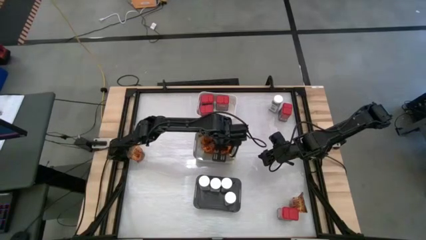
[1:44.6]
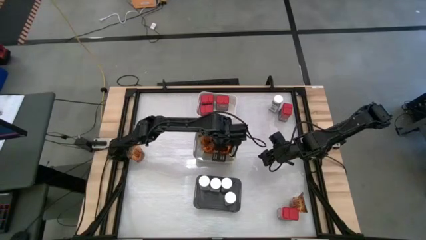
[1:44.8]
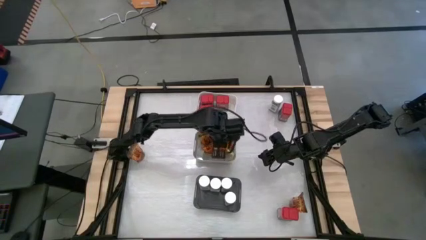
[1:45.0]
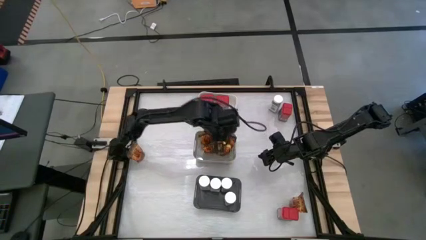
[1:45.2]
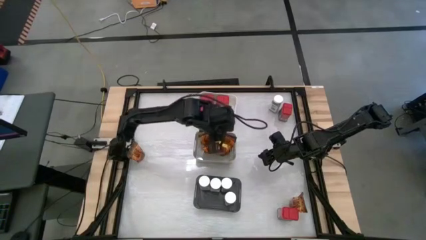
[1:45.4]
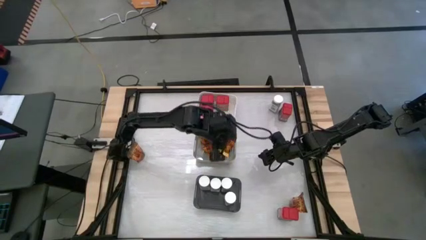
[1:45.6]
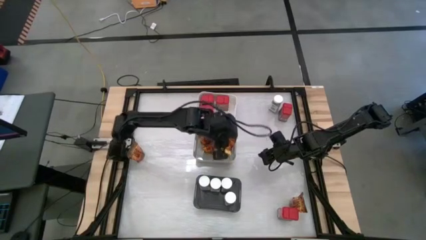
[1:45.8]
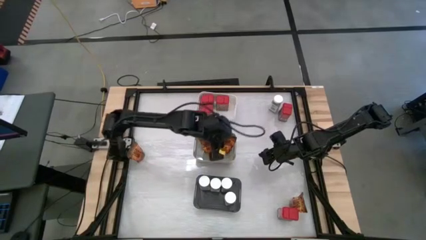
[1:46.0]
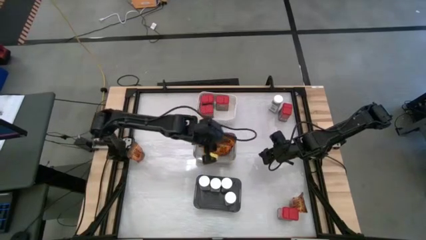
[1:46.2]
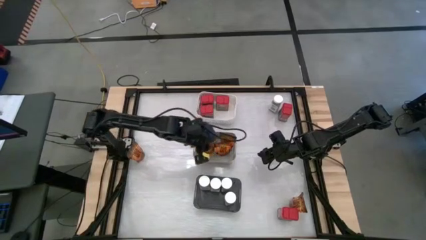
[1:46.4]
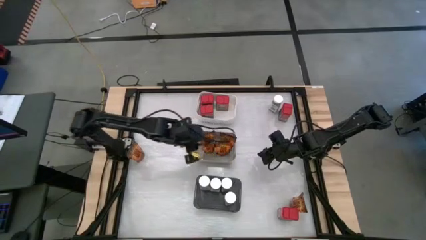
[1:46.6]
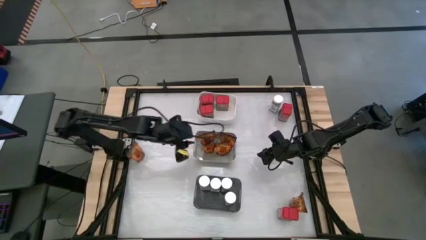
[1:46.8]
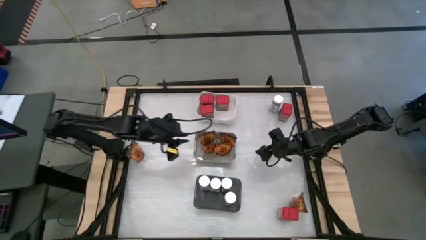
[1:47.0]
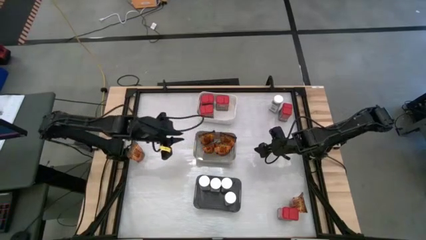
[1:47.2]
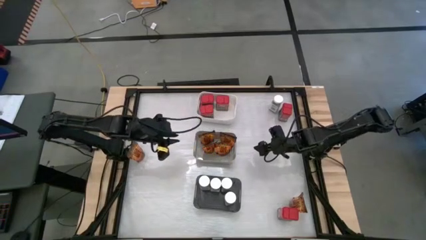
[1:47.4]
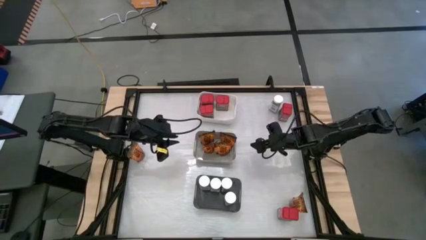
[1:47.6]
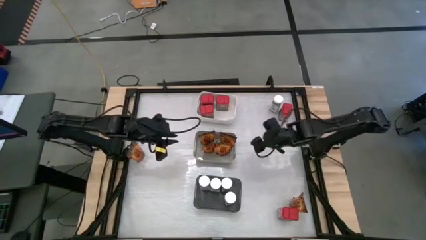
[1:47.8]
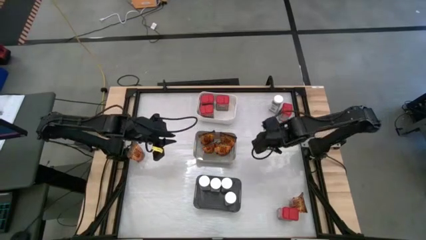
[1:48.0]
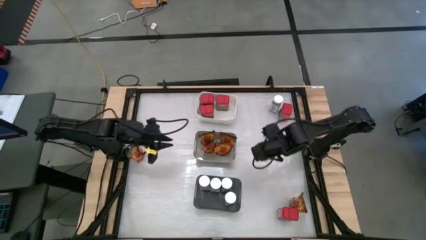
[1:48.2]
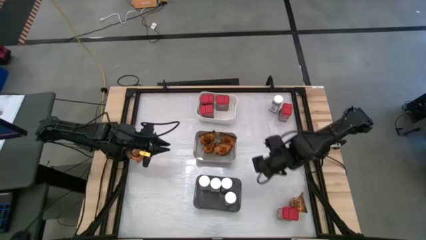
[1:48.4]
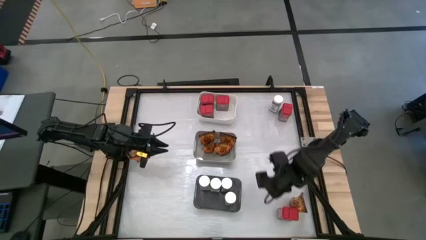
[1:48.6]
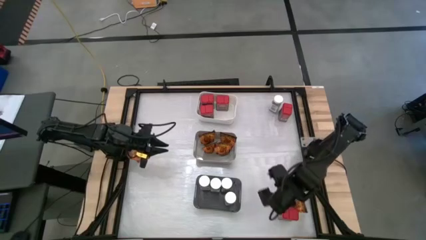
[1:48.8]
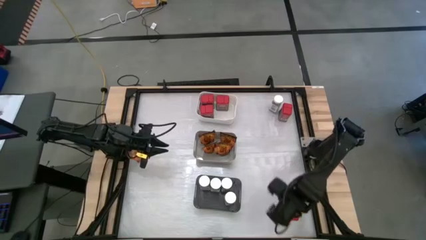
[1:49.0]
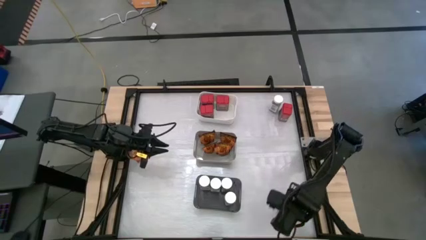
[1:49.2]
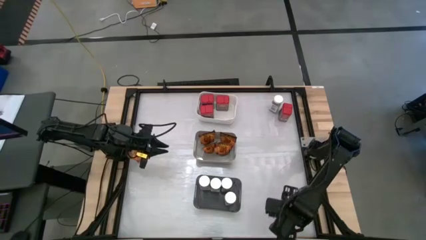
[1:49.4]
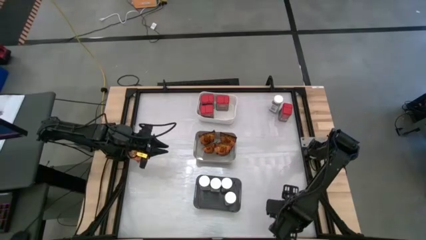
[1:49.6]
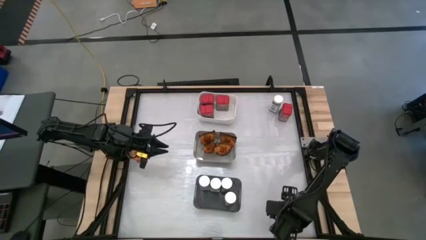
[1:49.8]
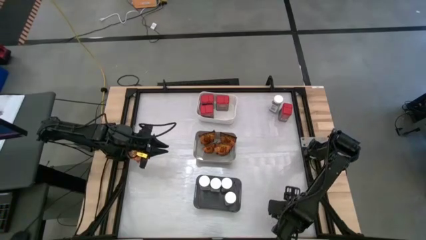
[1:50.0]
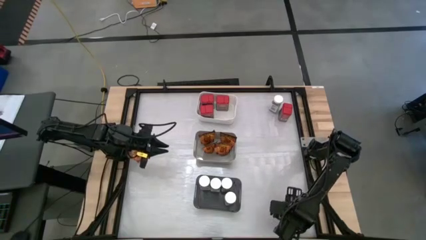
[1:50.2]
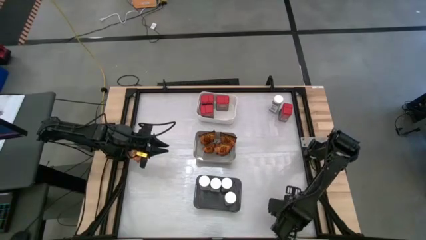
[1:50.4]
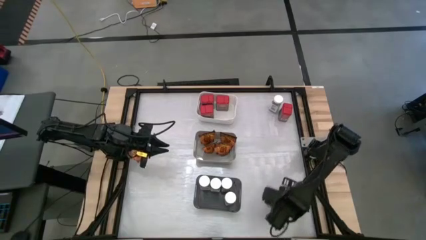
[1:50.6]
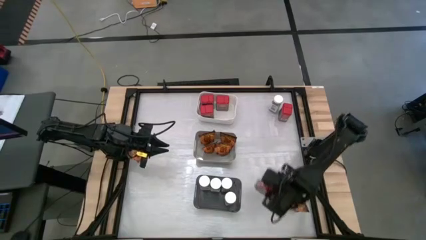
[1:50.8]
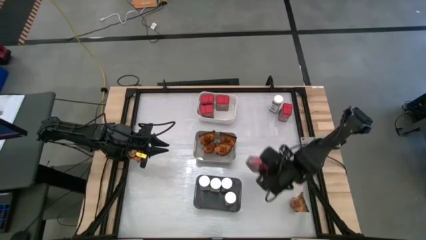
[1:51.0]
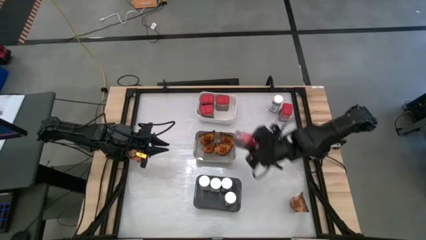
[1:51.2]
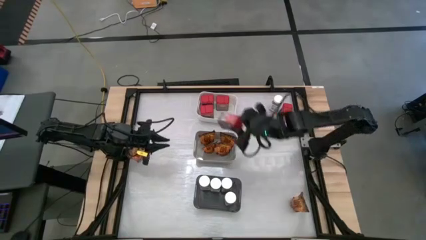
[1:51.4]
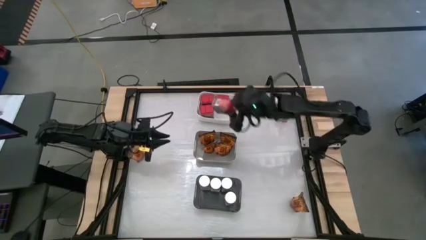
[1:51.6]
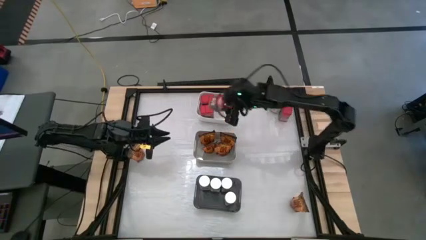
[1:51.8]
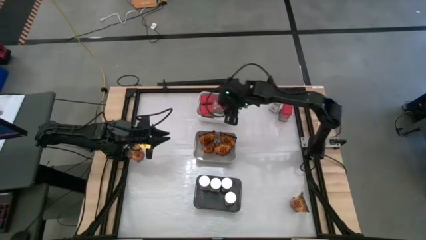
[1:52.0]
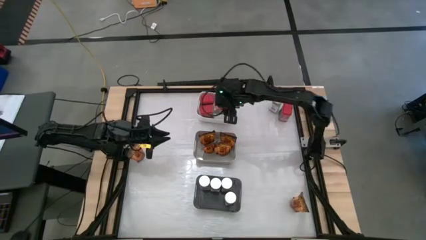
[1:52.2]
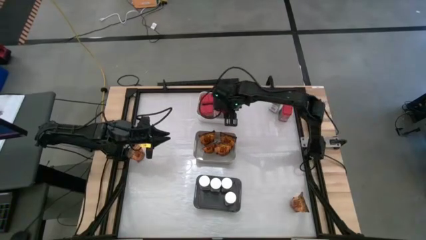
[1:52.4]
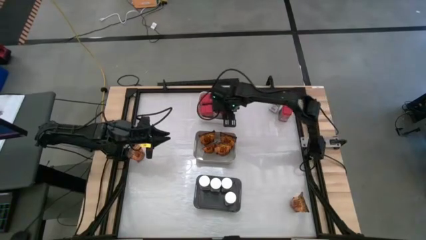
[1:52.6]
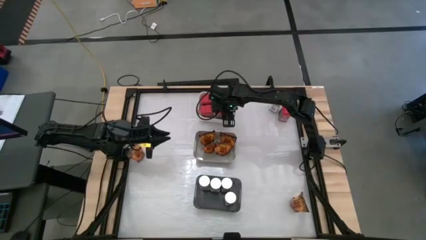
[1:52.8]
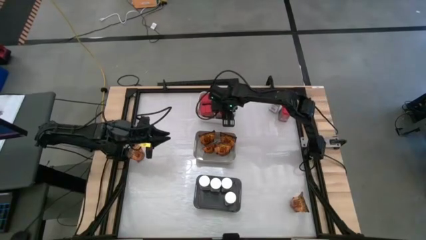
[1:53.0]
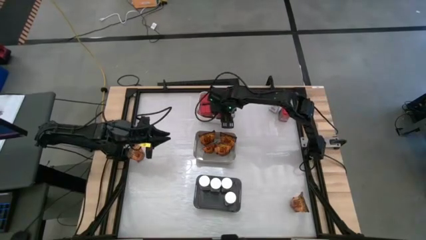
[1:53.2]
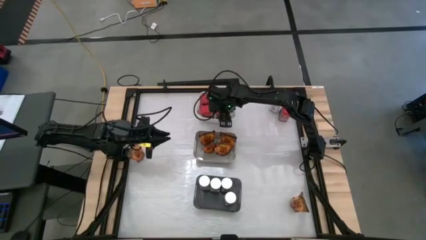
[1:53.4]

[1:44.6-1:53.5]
Task: Sort spices by type
Put the red seasoning can into the white bin

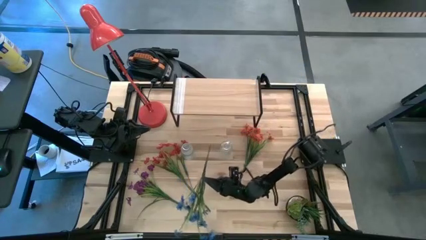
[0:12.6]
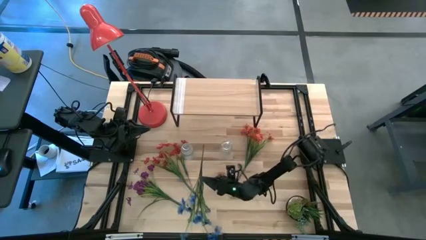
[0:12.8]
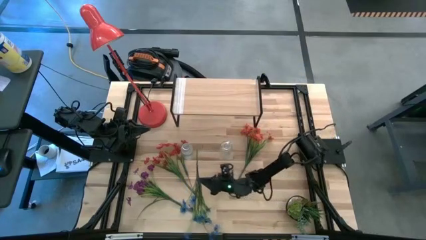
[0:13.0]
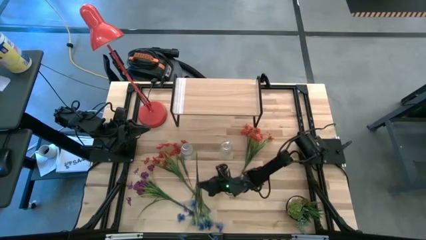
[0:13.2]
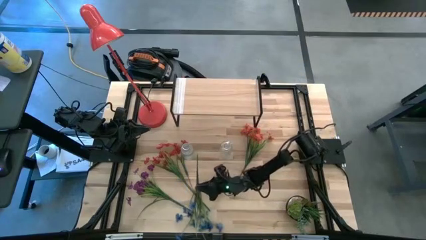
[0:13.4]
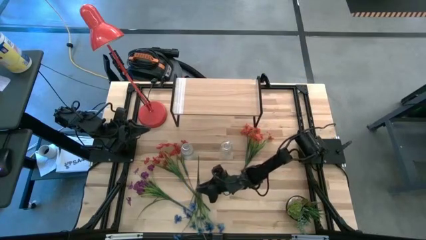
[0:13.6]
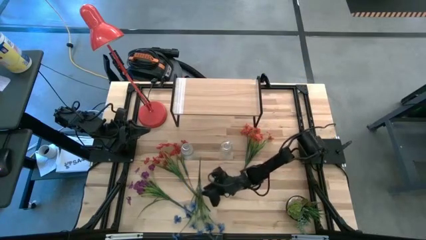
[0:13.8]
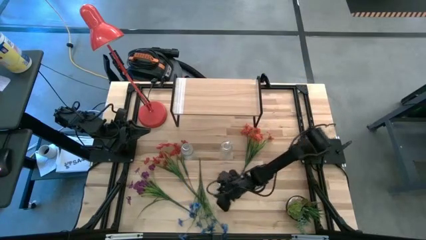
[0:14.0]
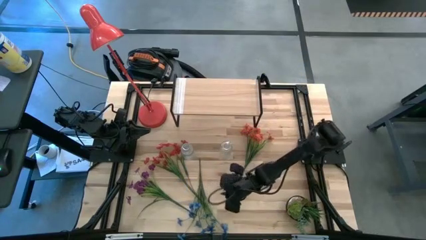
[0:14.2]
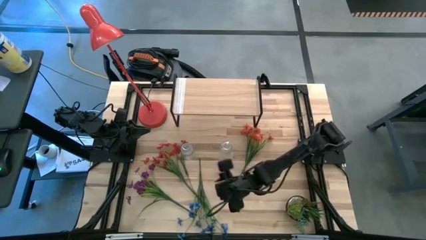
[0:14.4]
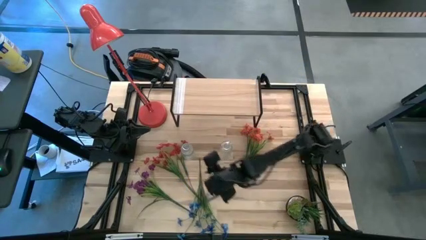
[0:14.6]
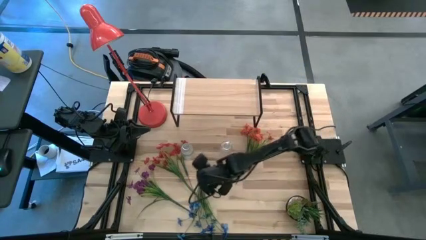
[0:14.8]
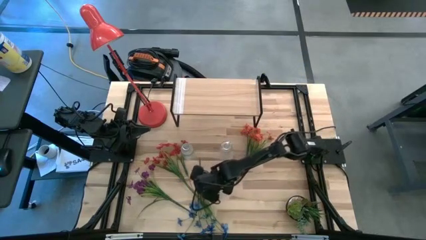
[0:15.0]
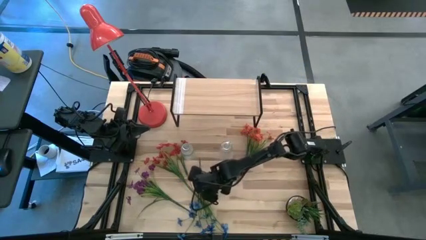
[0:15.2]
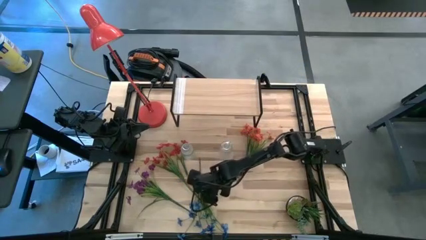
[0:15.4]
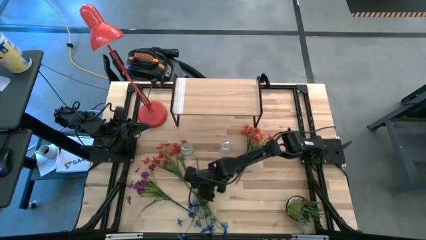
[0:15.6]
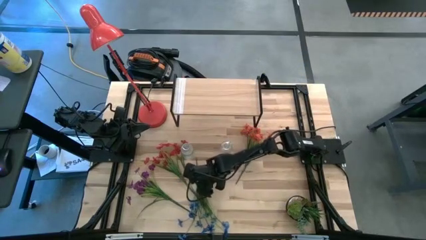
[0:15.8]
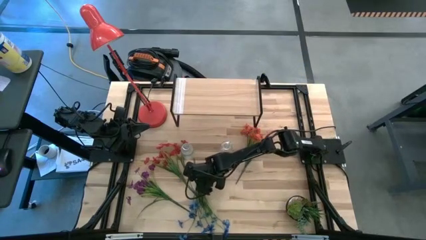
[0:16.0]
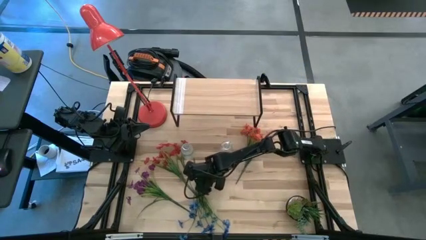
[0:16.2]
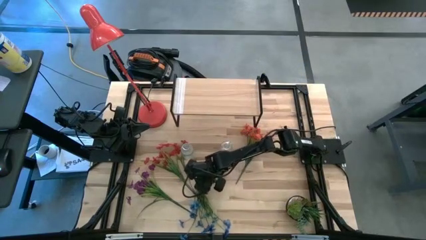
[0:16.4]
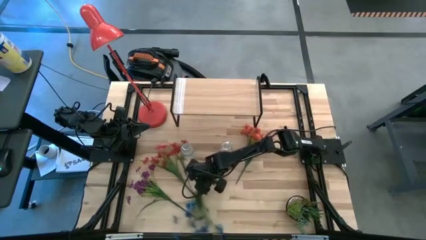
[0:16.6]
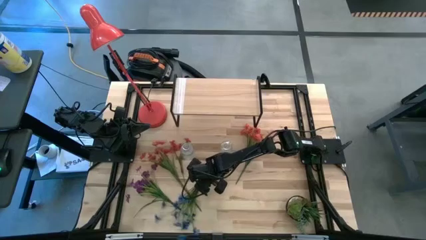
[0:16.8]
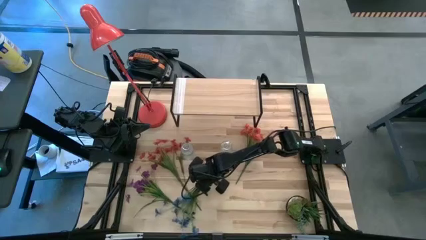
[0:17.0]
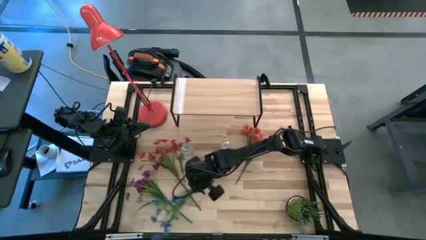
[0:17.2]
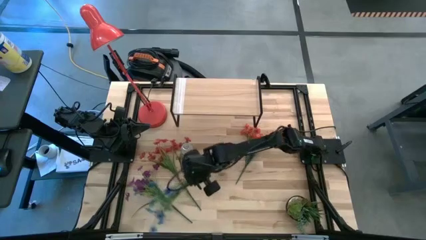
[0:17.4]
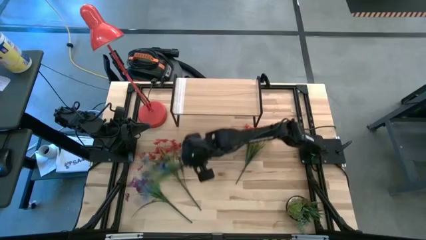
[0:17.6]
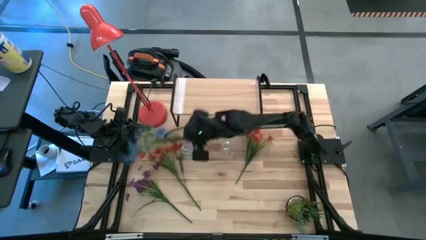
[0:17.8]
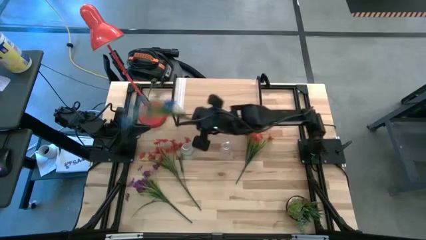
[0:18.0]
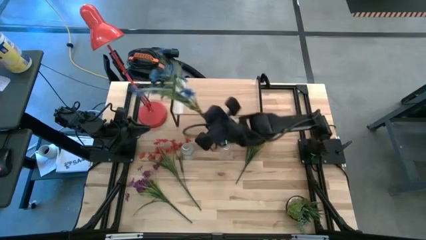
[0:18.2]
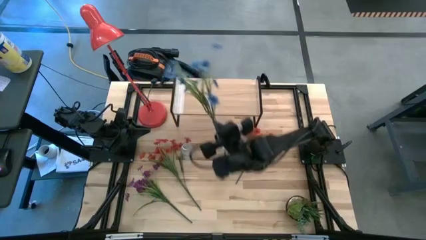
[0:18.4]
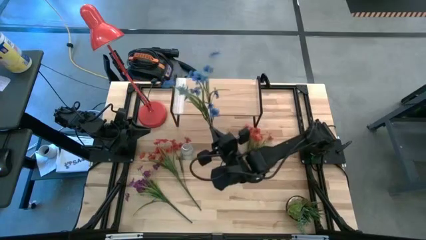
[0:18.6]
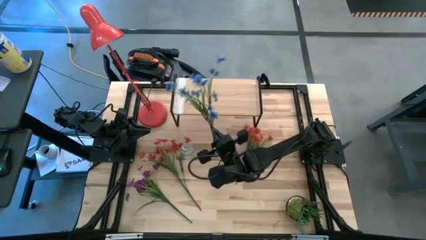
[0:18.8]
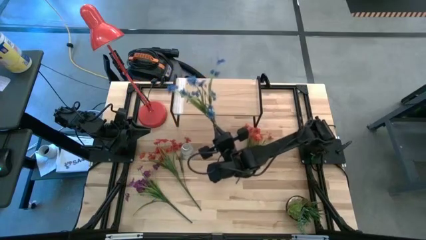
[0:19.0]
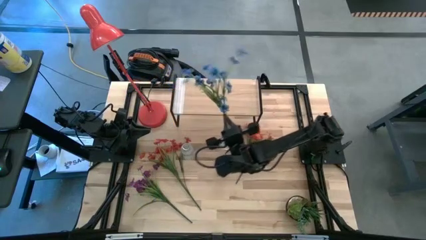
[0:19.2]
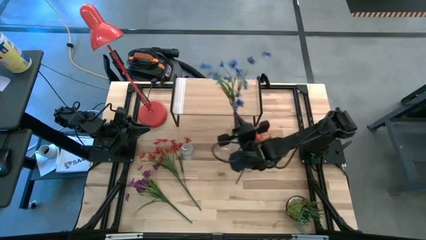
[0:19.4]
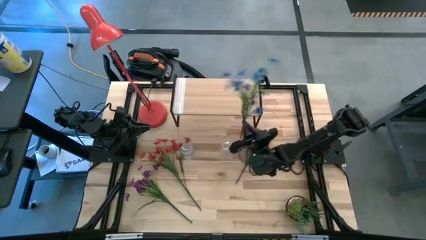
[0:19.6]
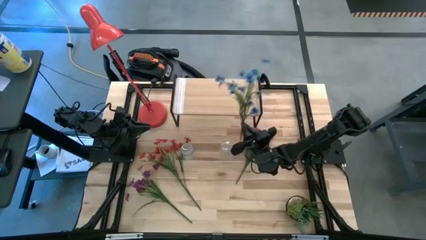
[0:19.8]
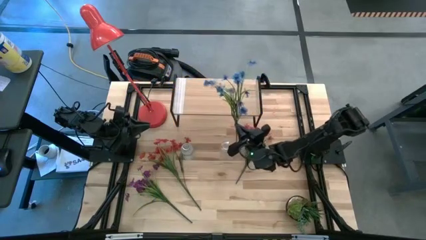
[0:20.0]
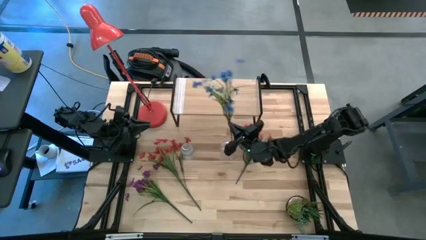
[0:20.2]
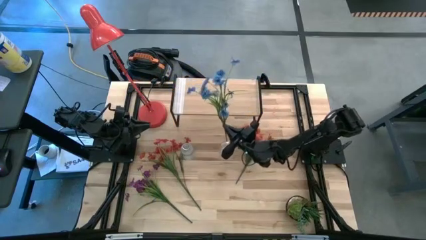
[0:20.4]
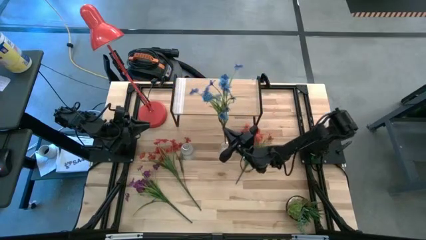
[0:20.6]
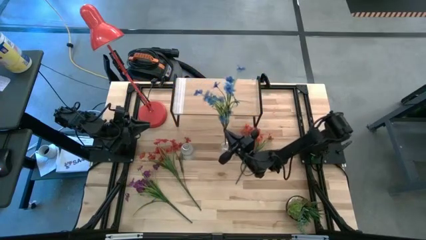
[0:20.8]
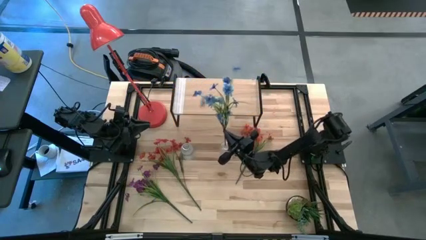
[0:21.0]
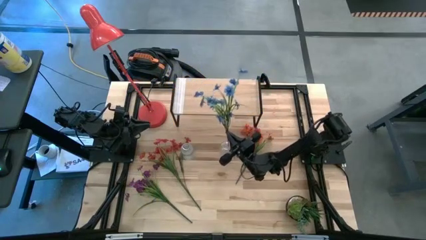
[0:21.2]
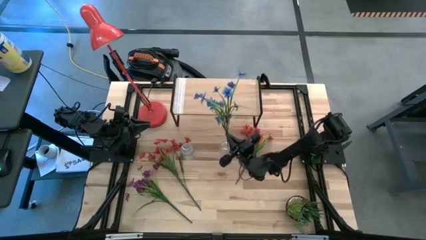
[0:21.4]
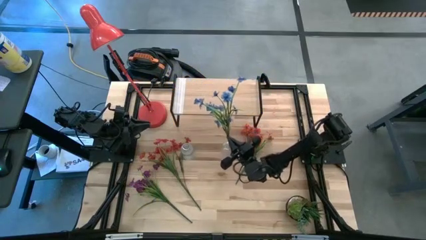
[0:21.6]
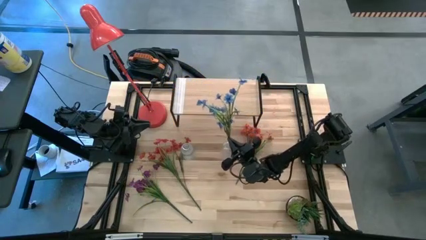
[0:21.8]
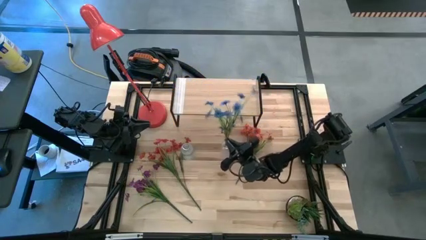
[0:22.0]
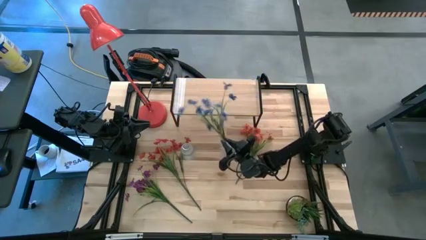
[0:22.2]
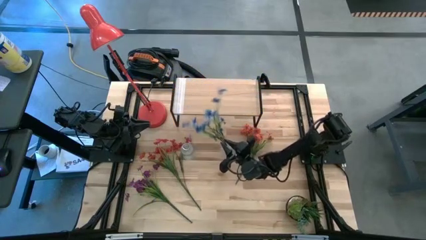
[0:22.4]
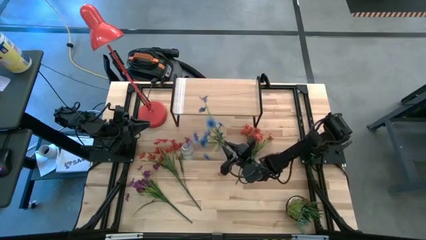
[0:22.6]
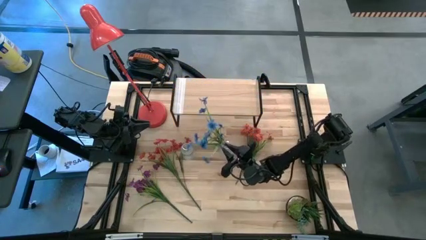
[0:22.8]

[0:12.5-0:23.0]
Task: Pick and place flowers into a vace then onto a shelf
Put the blue flowers into the right transparent flower vase
